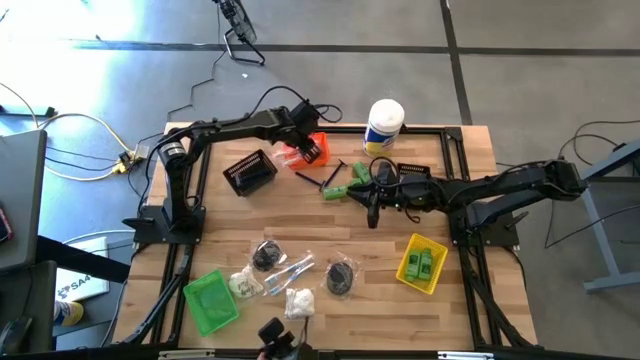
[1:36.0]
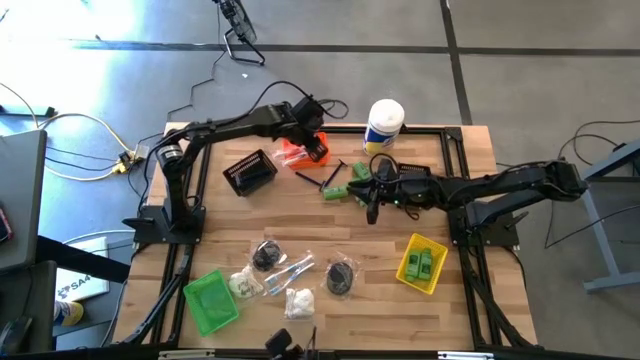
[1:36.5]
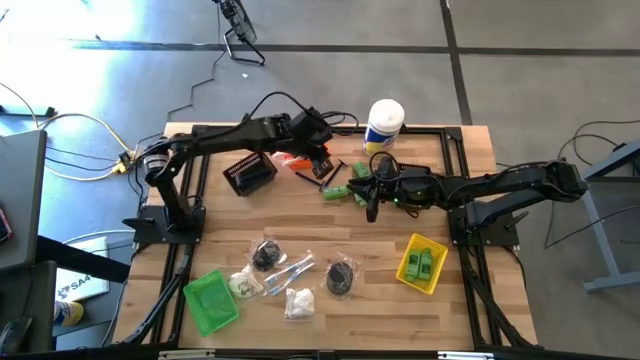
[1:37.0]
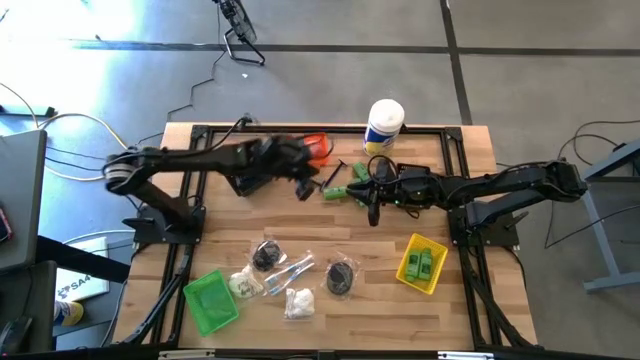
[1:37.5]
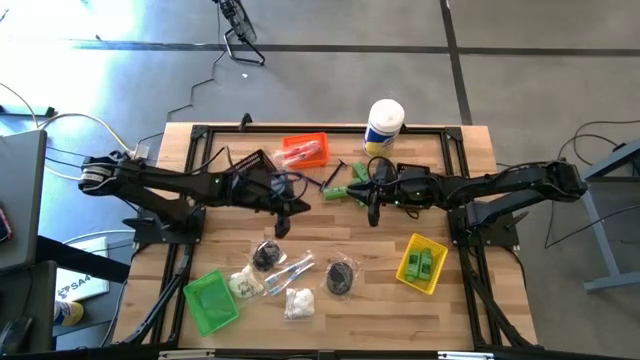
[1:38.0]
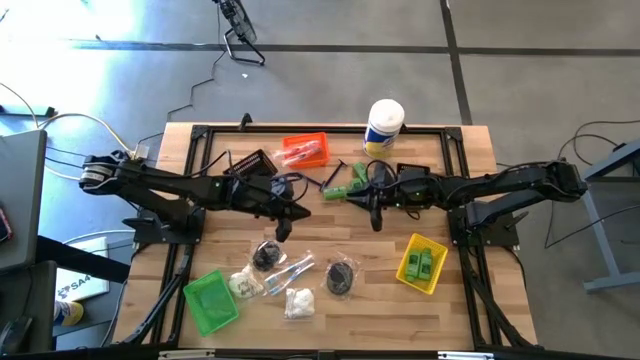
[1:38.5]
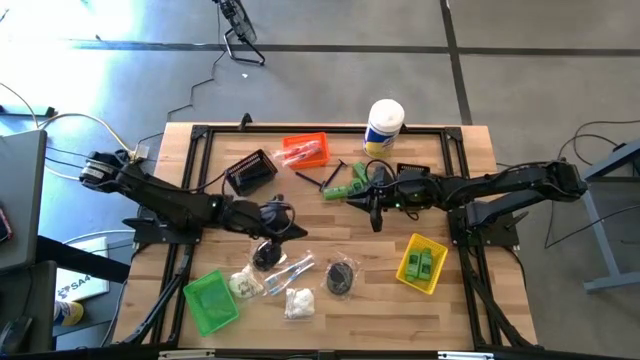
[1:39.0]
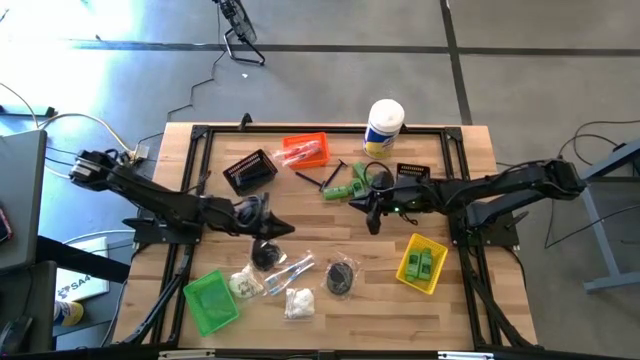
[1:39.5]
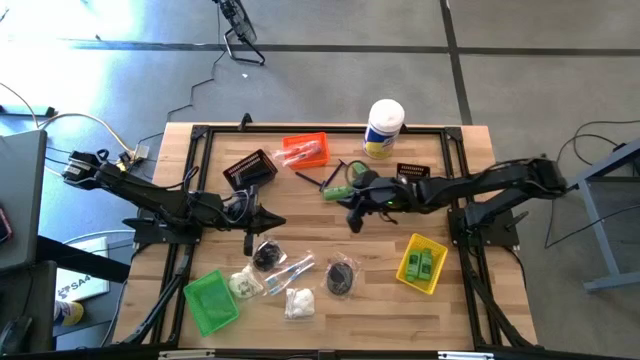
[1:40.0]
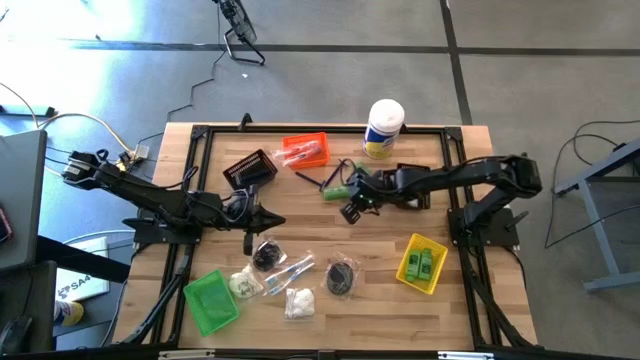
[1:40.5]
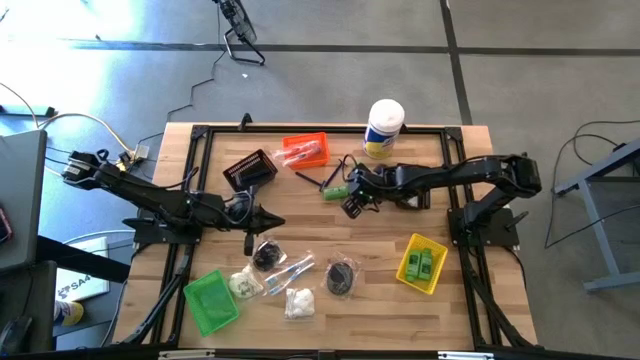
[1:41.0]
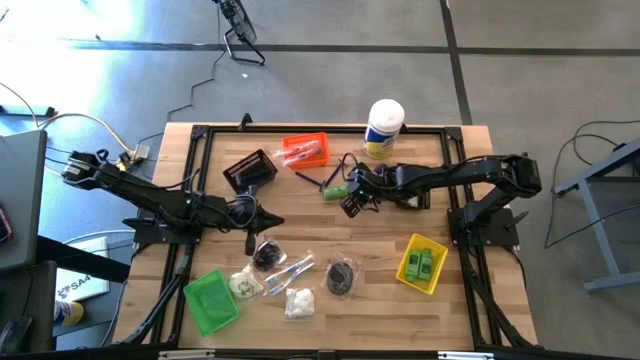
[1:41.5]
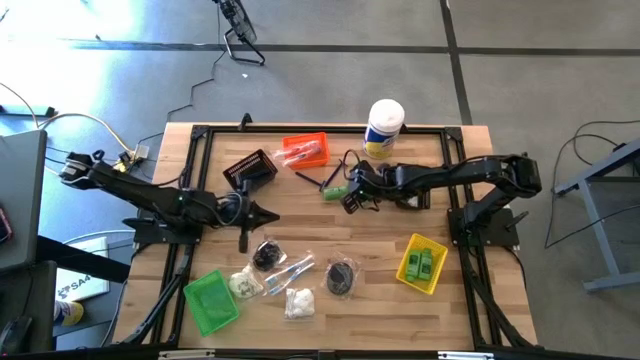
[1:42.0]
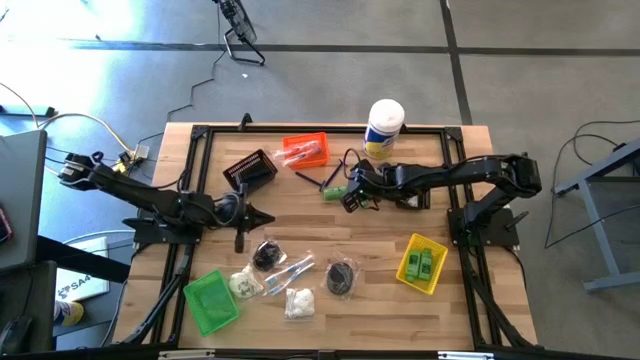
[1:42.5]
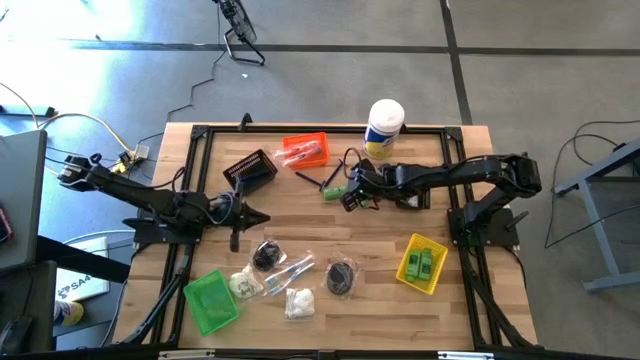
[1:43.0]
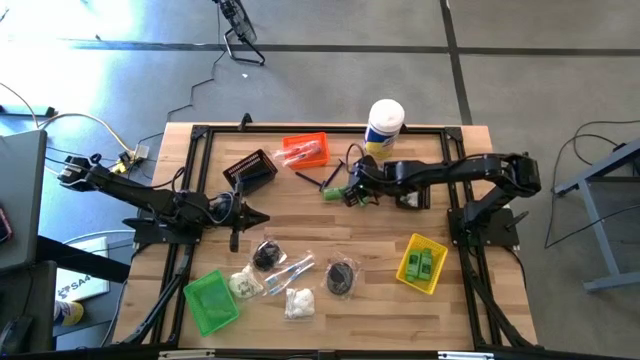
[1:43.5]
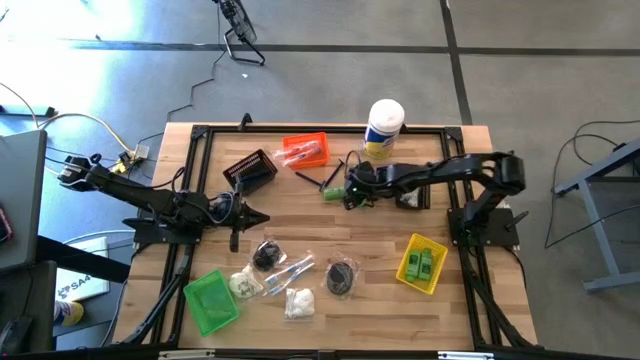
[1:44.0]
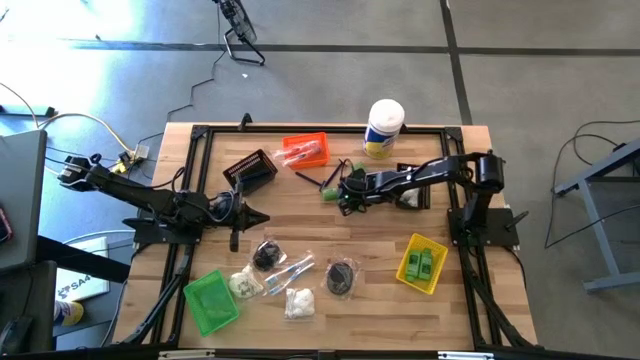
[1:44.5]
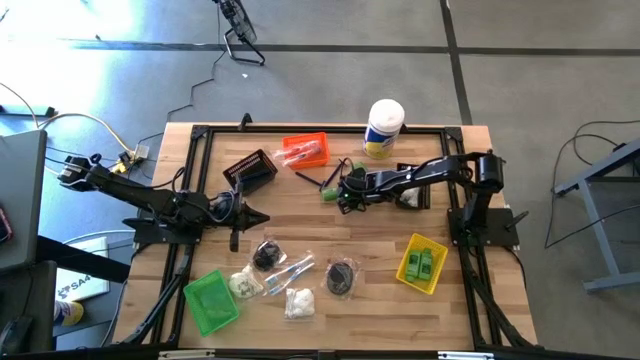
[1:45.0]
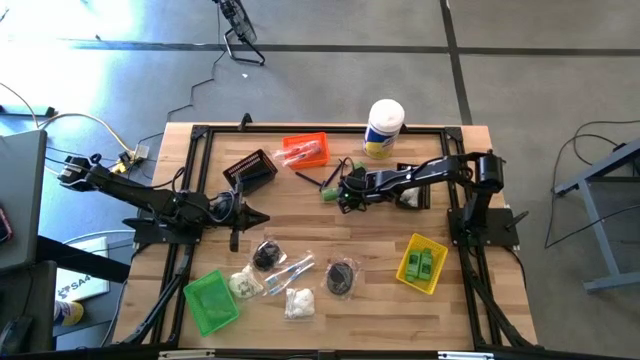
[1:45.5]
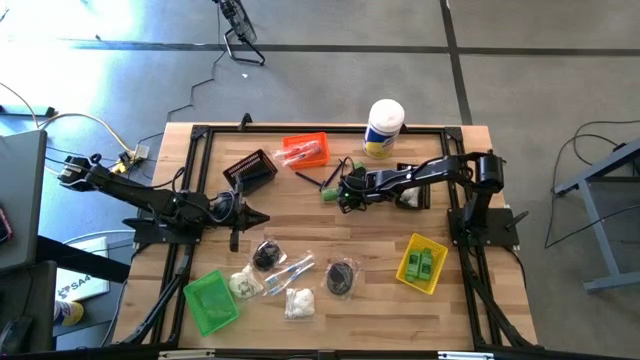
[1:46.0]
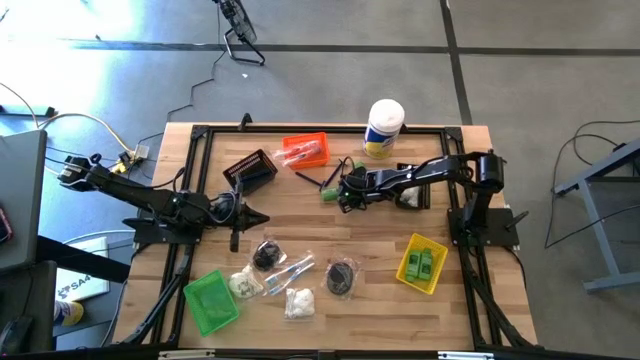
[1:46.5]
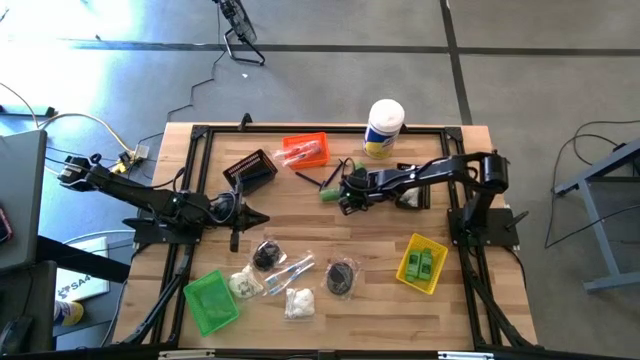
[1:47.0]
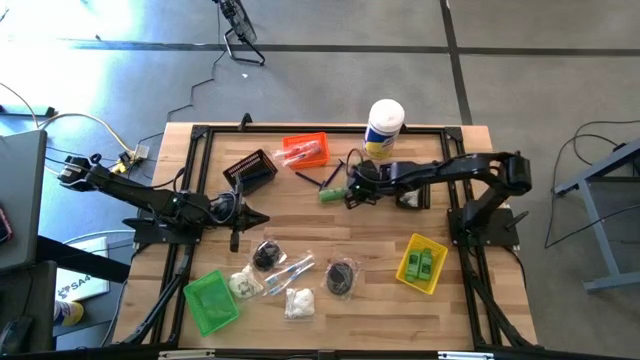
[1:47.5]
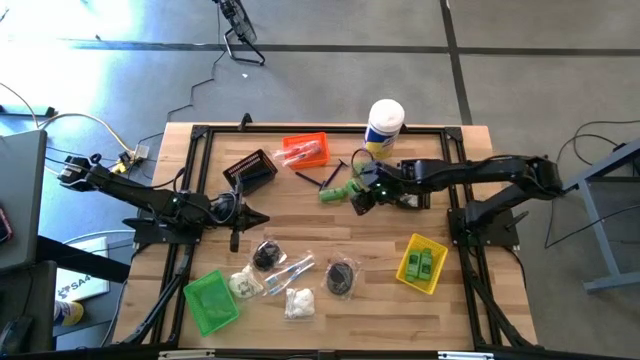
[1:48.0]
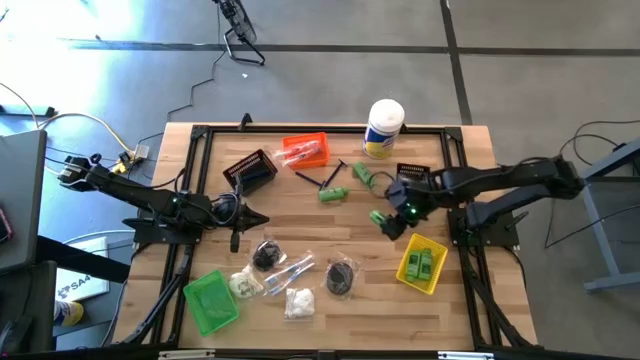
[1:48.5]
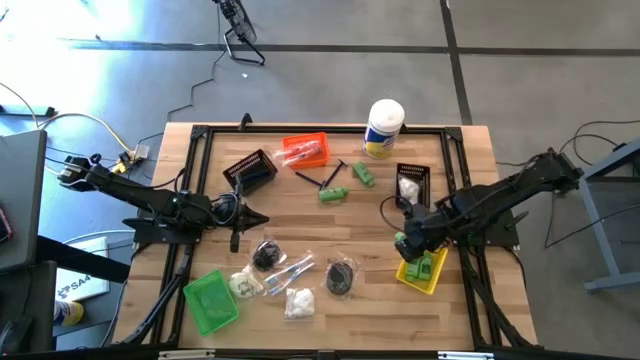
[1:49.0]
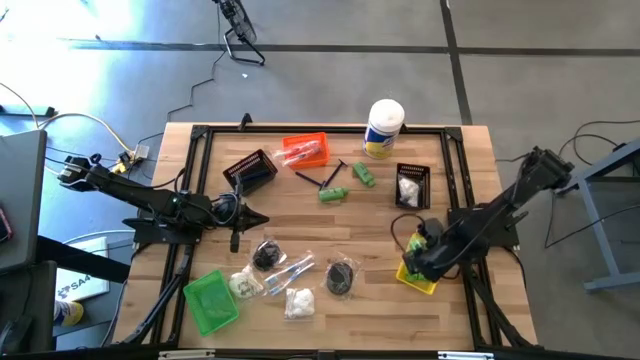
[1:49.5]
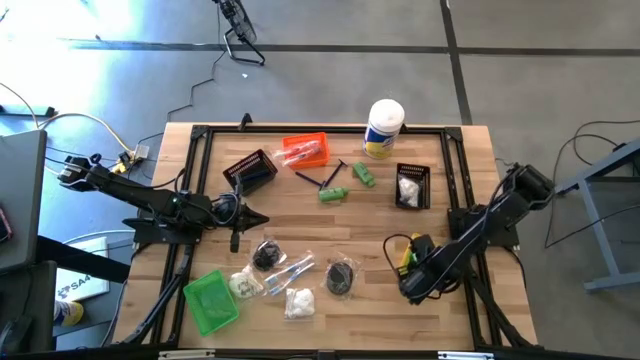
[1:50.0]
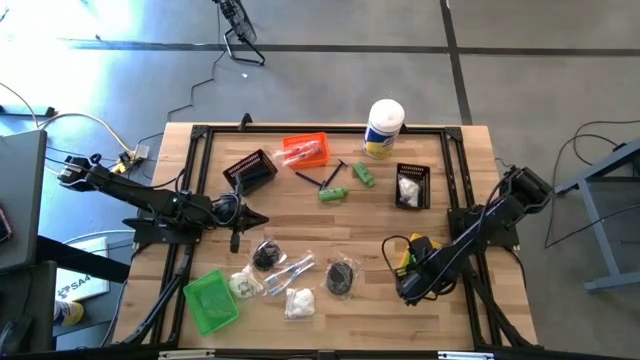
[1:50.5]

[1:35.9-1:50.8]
Task: Pick & Place Travel size toiletries
Put the green shampoo bottle into the yellow bin

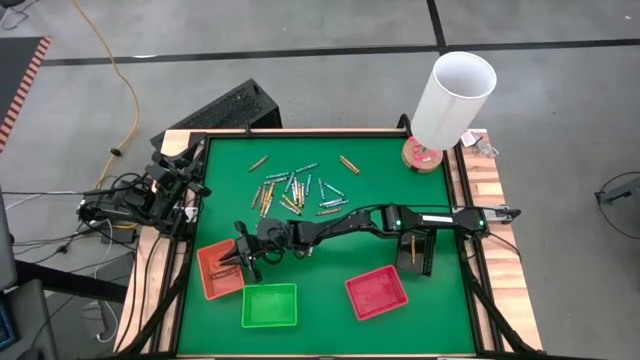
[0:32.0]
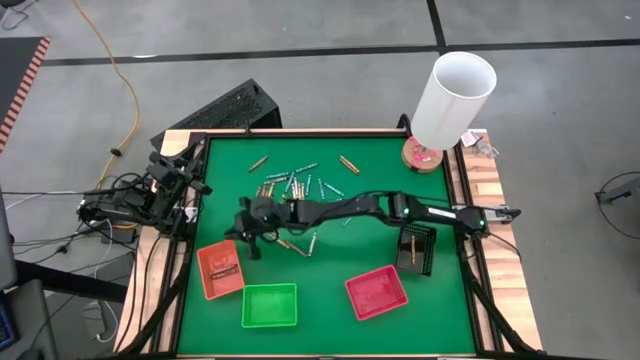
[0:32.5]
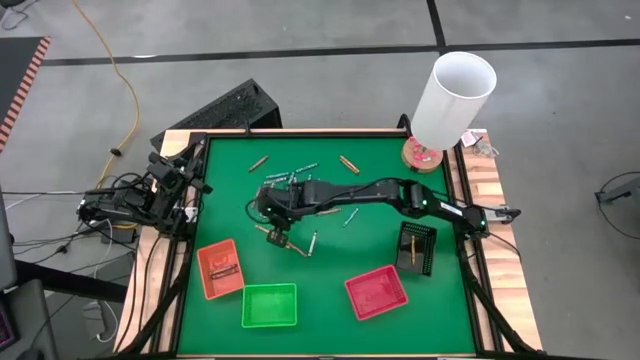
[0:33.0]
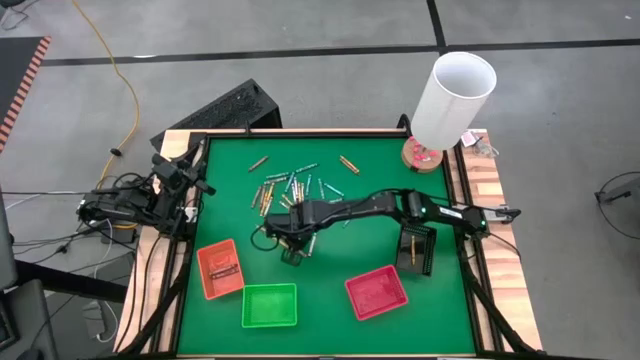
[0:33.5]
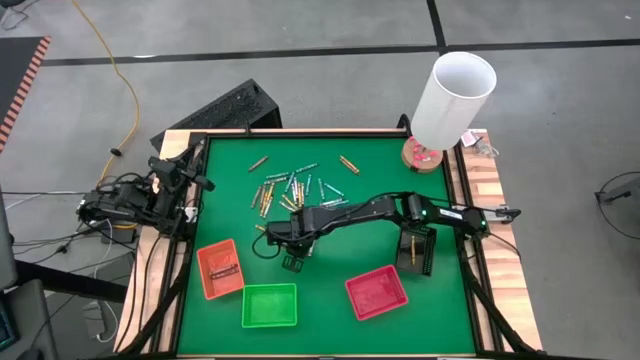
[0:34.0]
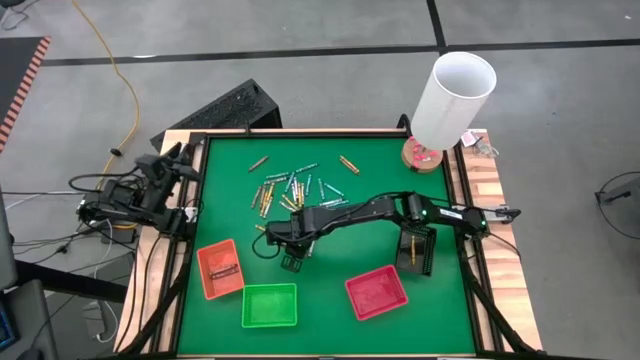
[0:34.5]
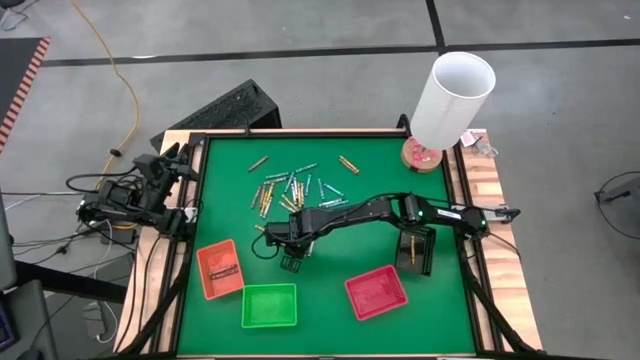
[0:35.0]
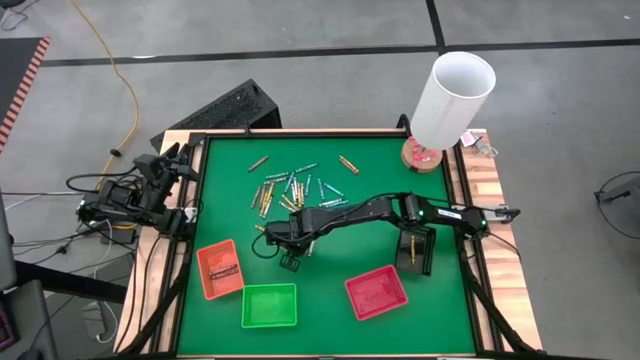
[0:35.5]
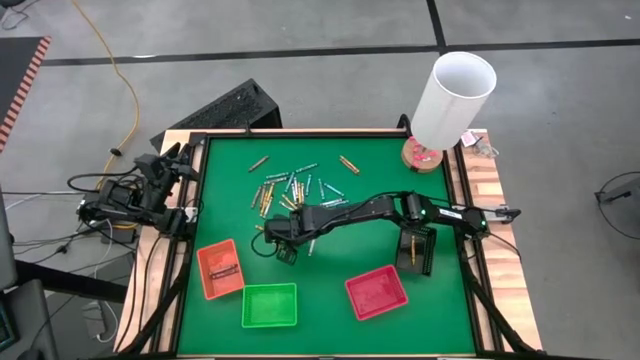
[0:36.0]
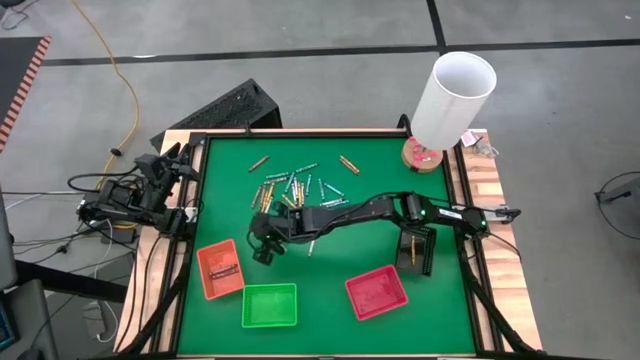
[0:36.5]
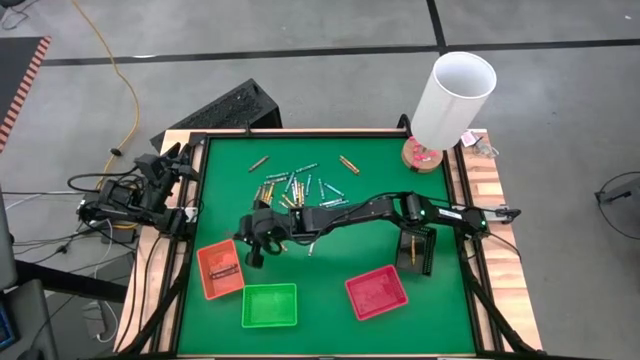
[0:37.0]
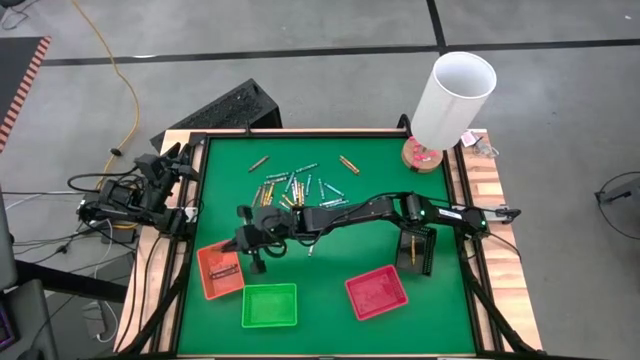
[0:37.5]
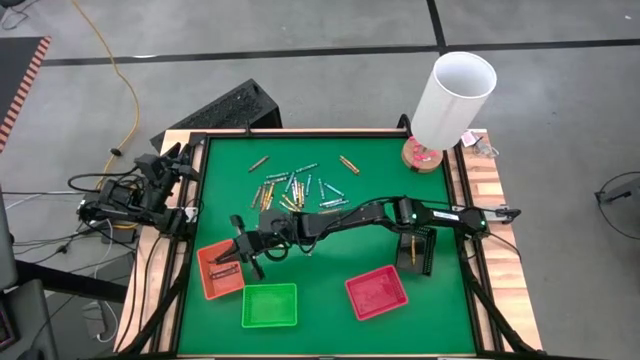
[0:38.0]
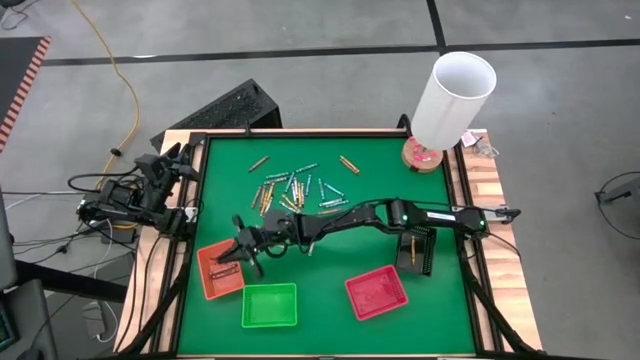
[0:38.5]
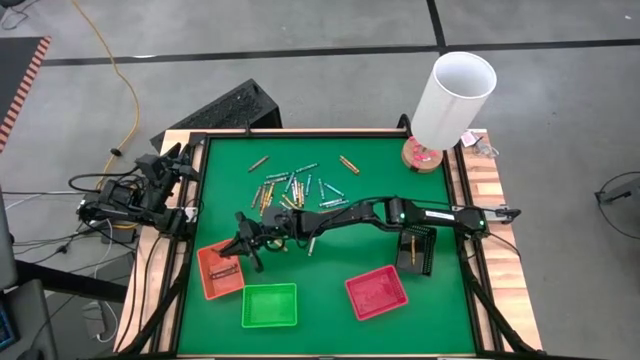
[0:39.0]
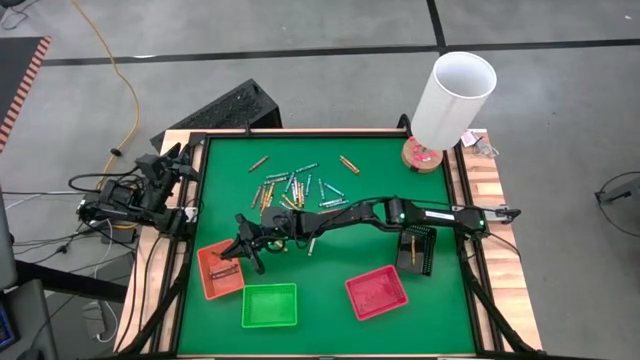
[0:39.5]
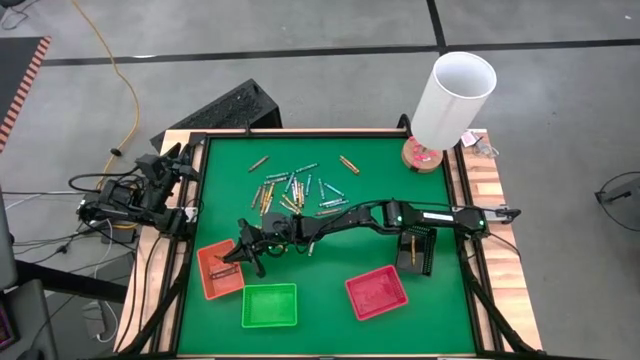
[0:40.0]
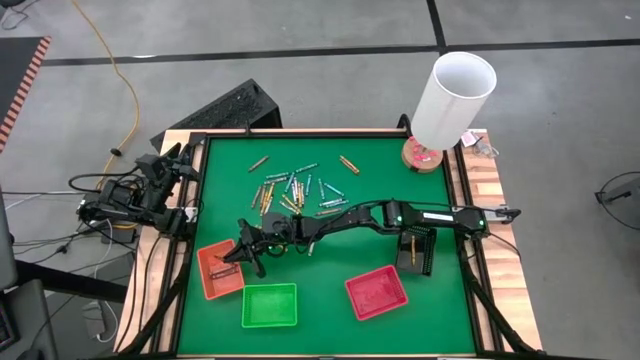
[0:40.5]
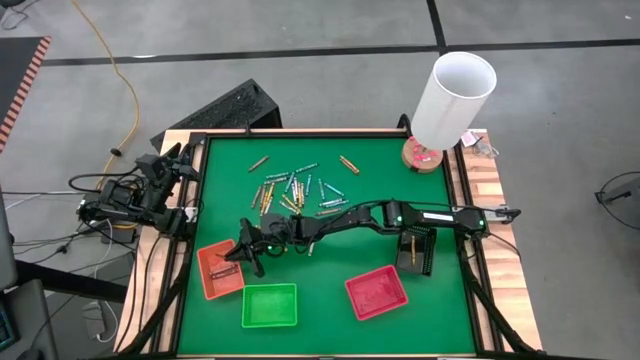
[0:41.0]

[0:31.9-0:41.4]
Task: Sort crayons
Put the brown crayon into the orange bin
